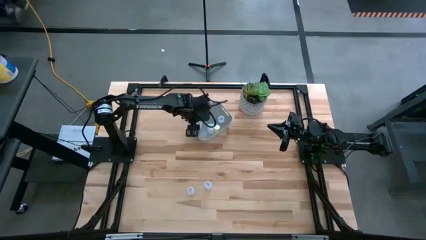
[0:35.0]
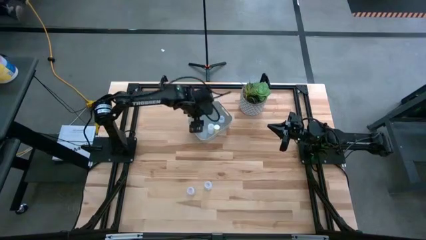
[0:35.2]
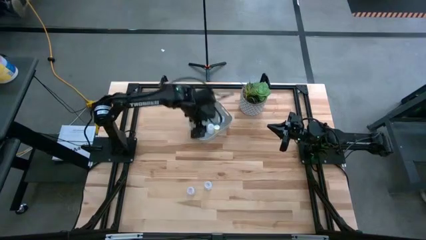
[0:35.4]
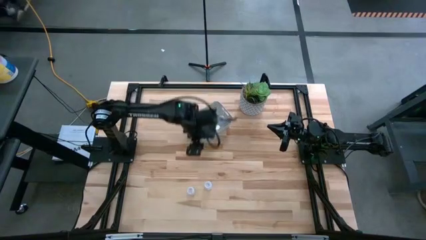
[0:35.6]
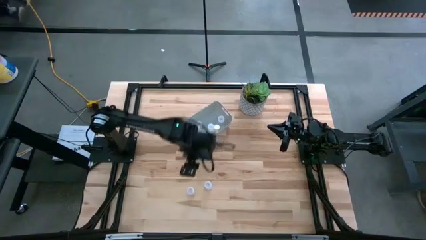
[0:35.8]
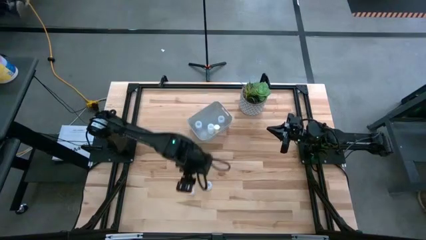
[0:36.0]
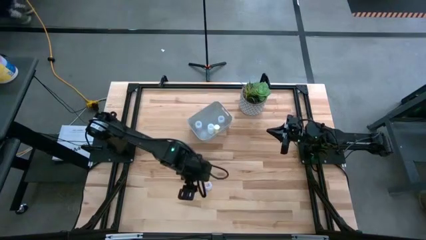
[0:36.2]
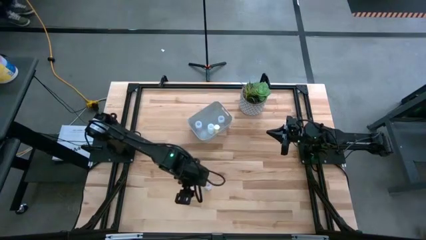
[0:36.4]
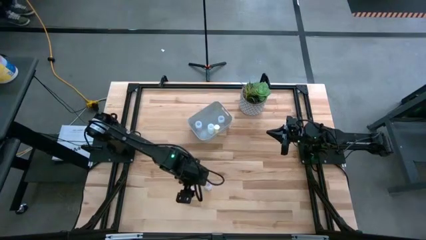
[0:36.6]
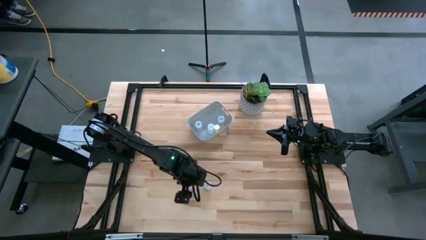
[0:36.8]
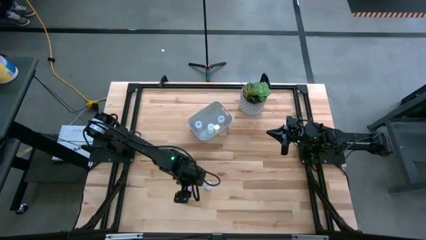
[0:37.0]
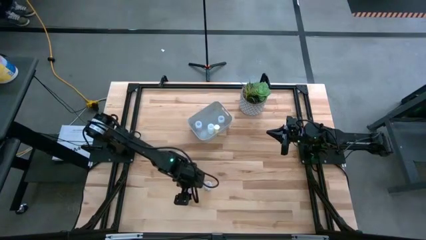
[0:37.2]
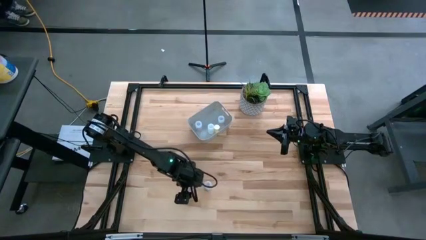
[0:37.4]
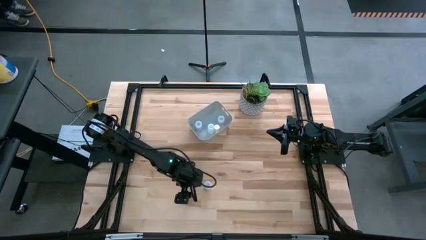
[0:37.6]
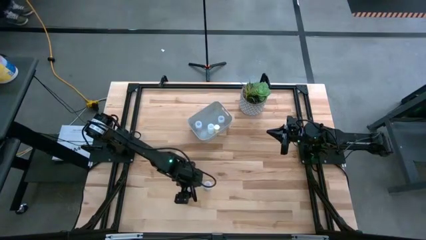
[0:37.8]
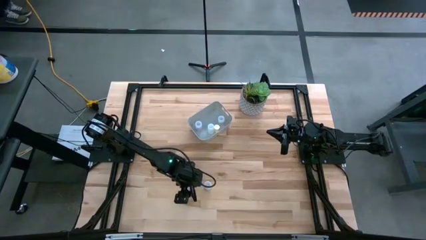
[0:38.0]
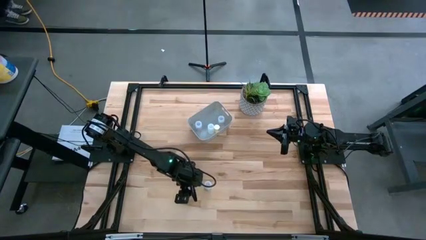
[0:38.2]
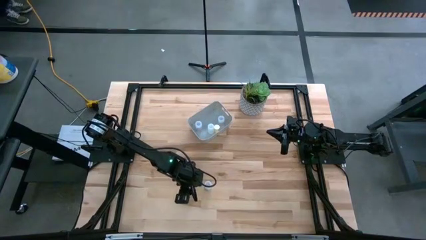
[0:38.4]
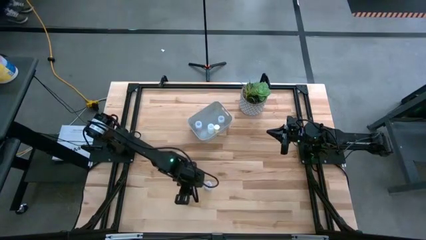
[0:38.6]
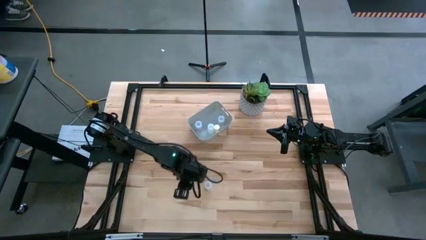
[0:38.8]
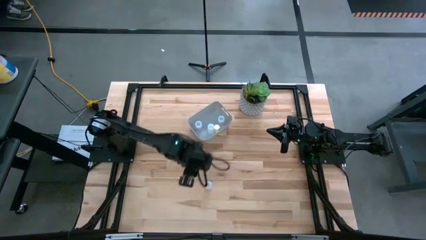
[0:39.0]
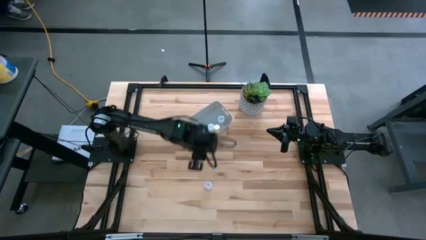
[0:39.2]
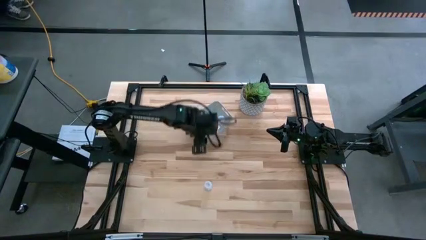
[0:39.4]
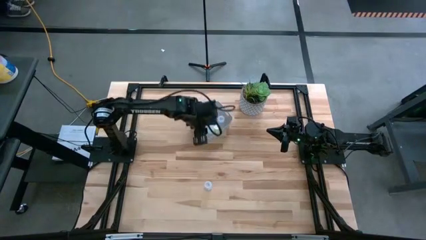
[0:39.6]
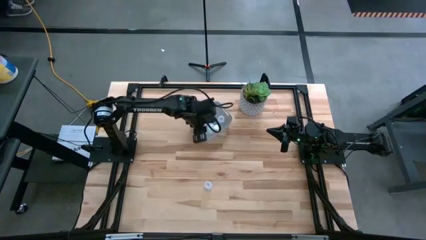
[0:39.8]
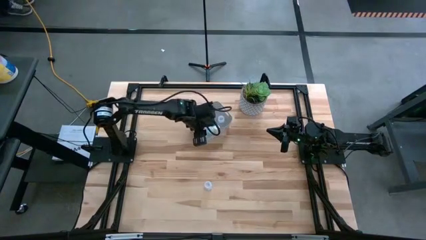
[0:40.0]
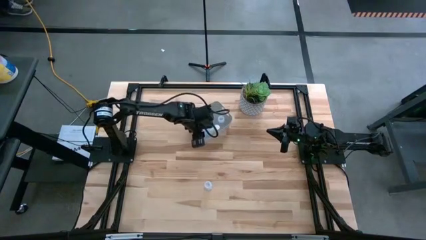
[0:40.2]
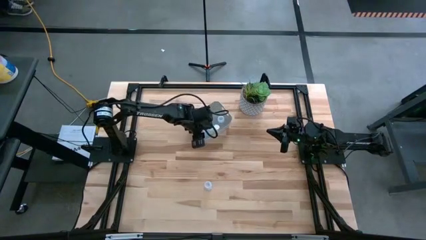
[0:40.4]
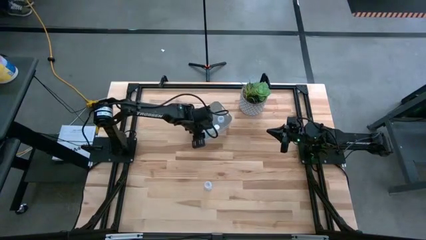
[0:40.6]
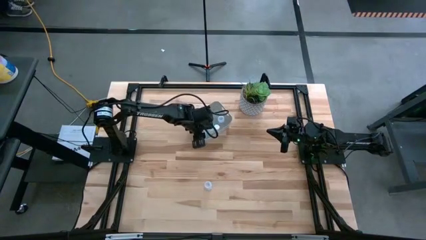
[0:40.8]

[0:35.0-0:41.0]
Task: Pick and place pill bottles into a basket
Put the transparent medicine bottle into the white bin

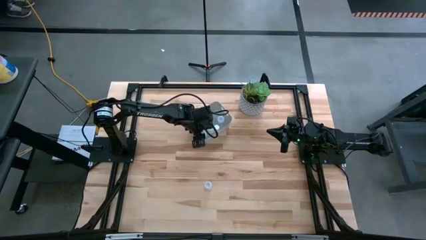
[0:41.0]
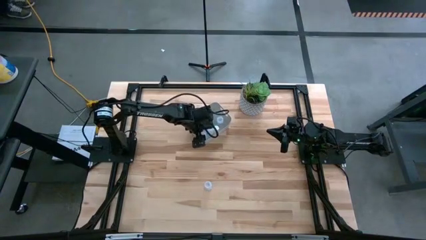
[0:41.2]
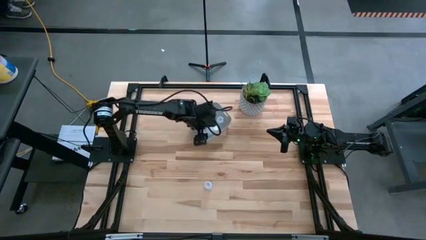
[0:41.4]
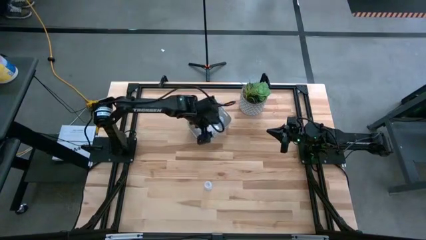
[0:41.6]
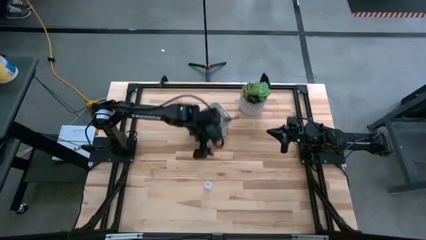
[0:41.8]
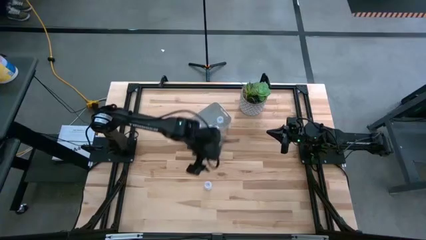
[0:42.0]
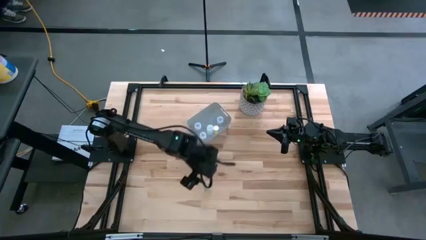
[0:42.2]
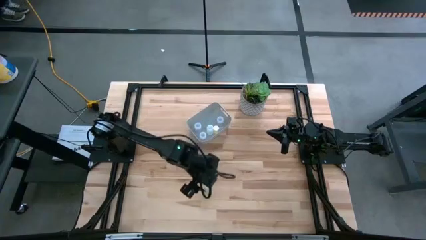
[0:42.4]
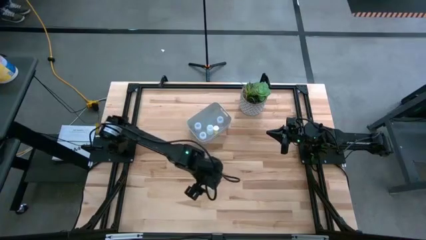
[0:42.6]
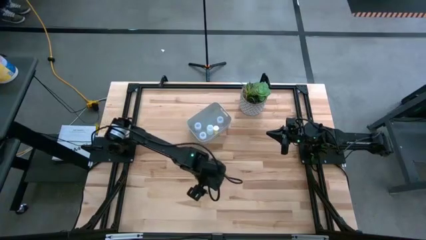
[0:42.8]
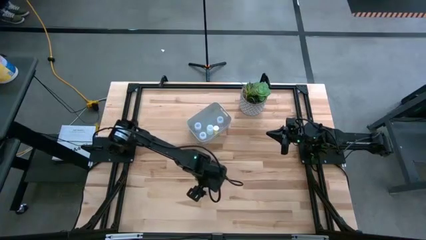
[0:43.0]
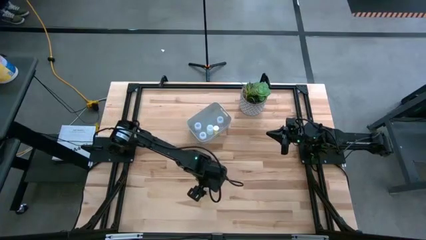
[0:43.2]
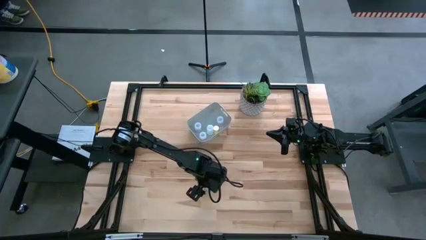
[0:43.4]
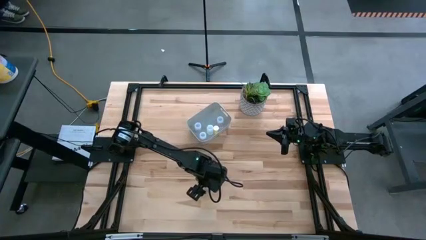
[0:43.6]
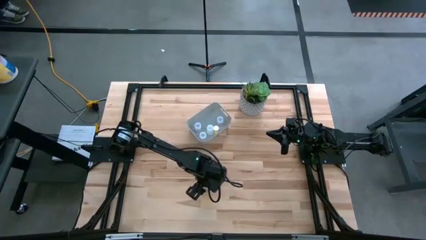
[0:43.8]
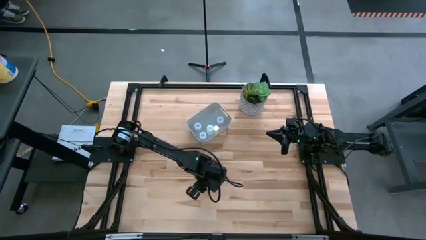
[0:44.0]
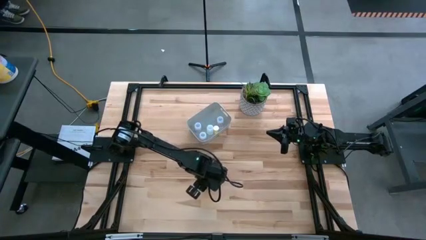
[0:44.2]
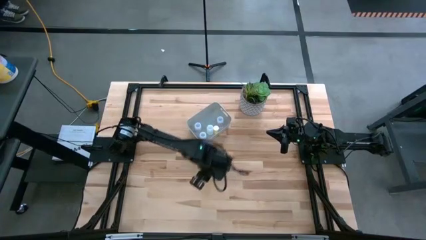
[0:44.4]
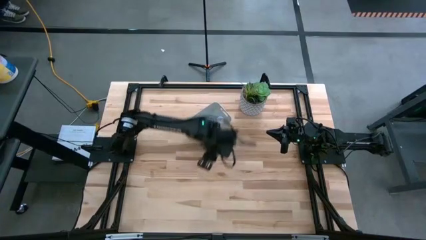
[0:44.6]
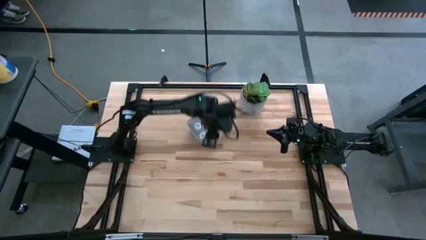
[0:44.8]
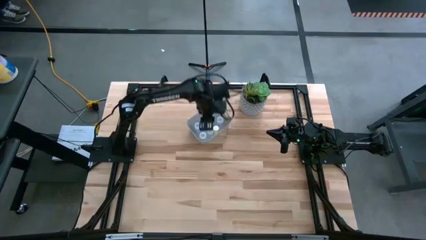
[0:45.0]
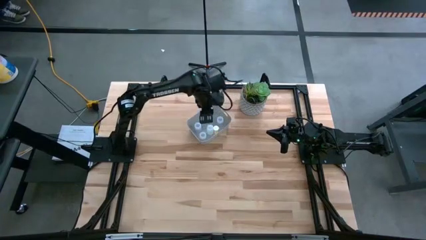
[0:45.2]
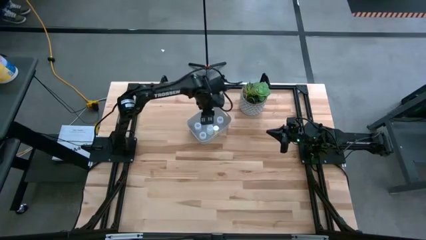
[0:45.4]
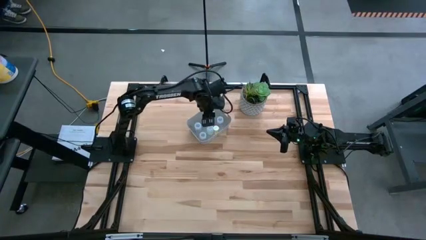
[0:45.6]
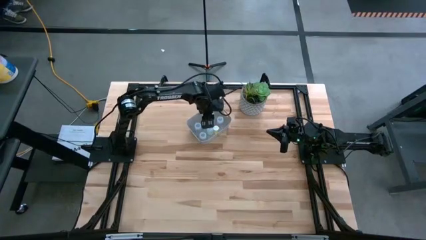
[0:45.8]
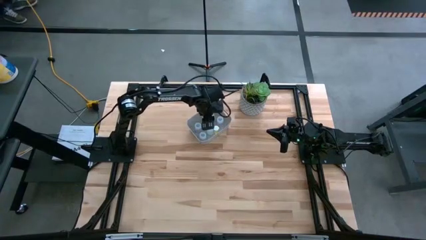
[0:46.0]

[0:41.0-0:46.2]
Put the transparent medicine bottle into the white bin

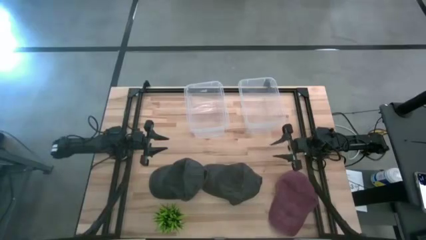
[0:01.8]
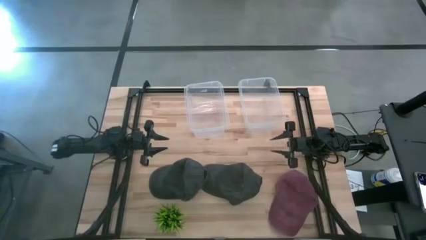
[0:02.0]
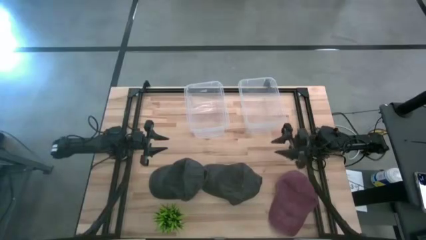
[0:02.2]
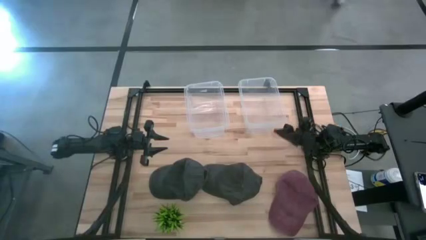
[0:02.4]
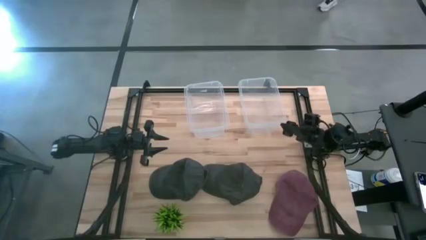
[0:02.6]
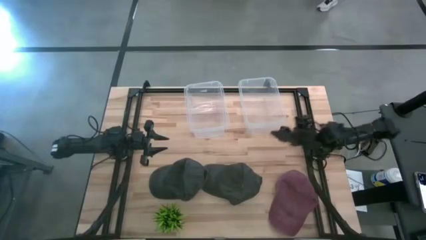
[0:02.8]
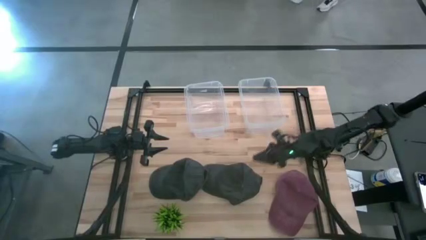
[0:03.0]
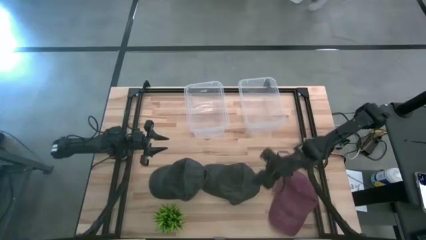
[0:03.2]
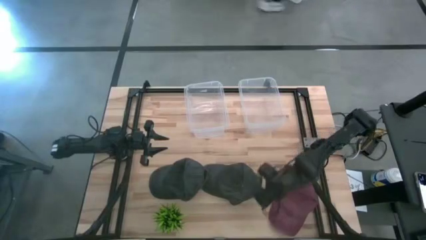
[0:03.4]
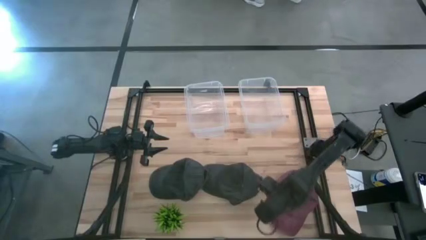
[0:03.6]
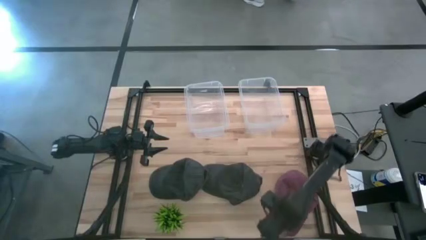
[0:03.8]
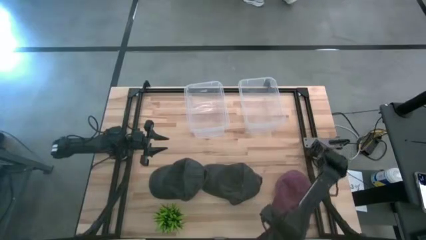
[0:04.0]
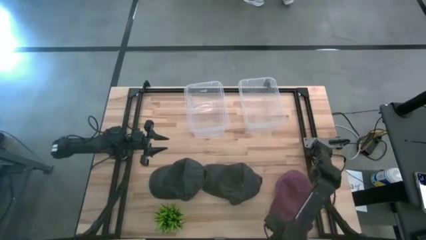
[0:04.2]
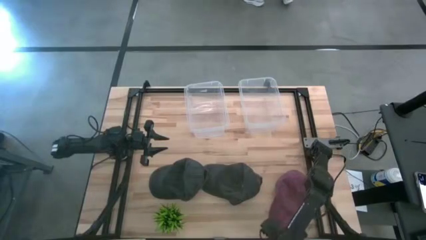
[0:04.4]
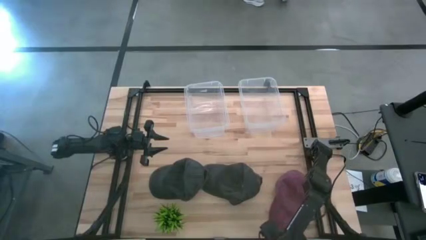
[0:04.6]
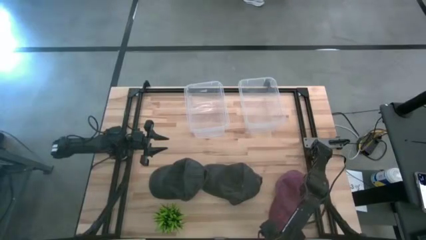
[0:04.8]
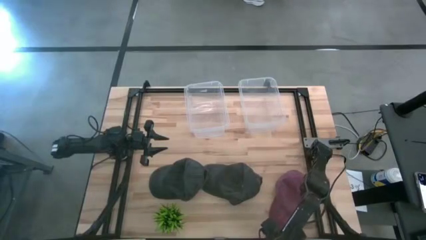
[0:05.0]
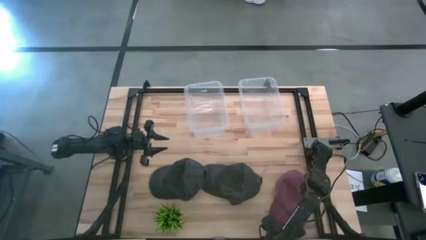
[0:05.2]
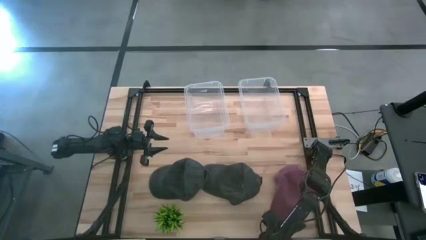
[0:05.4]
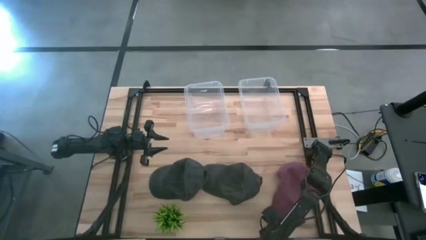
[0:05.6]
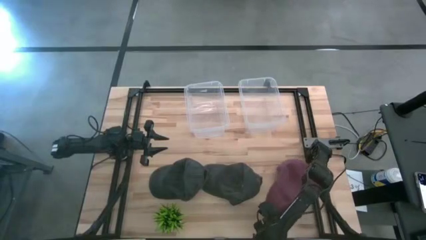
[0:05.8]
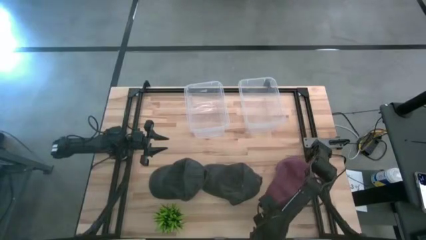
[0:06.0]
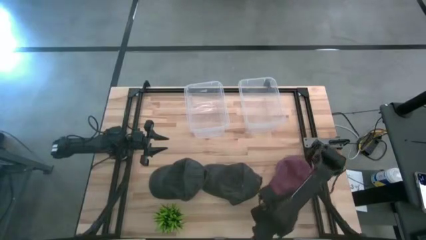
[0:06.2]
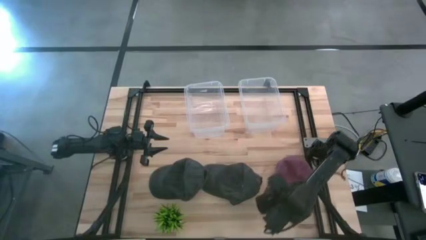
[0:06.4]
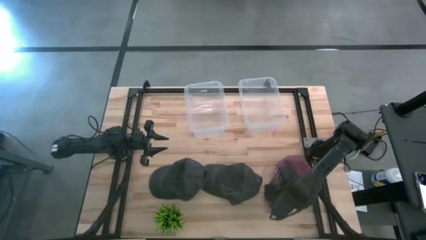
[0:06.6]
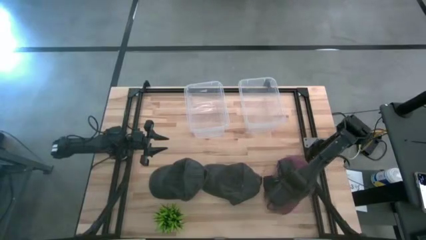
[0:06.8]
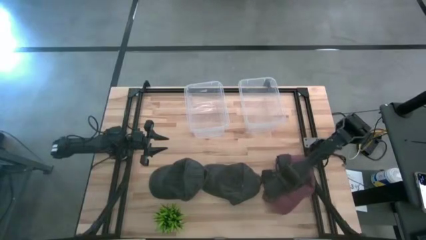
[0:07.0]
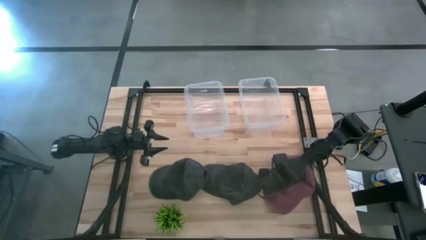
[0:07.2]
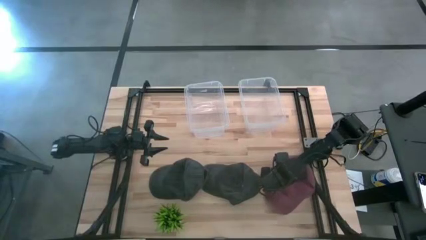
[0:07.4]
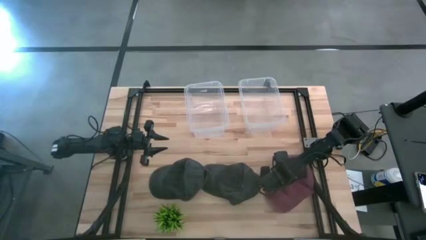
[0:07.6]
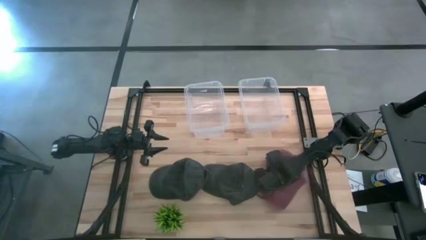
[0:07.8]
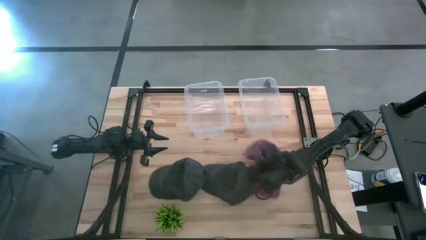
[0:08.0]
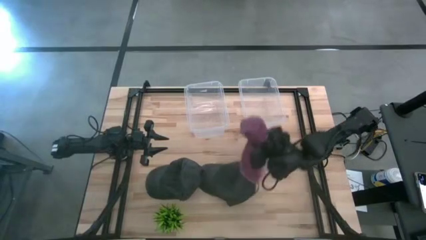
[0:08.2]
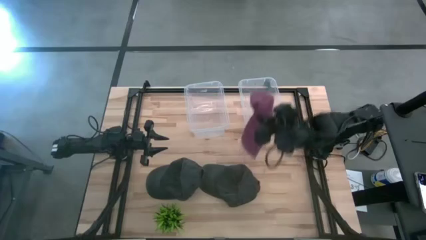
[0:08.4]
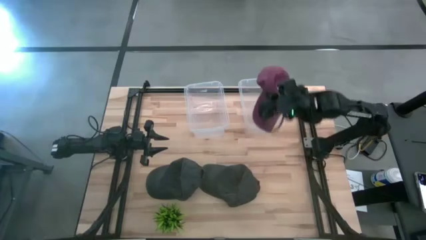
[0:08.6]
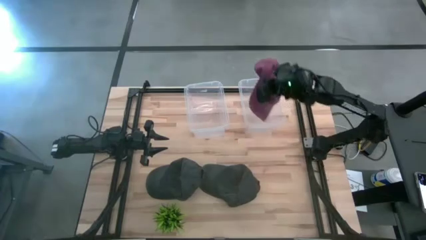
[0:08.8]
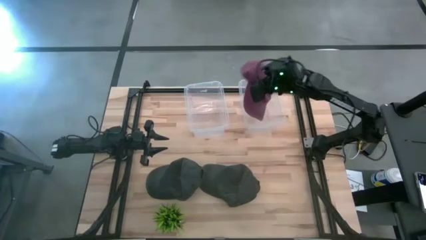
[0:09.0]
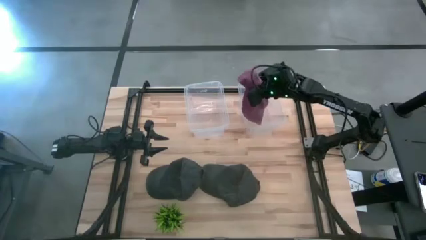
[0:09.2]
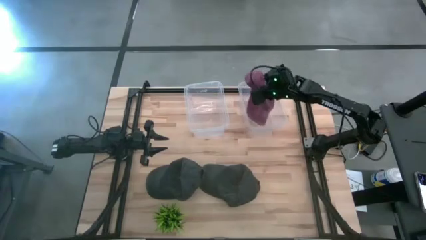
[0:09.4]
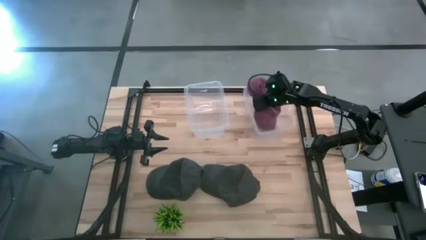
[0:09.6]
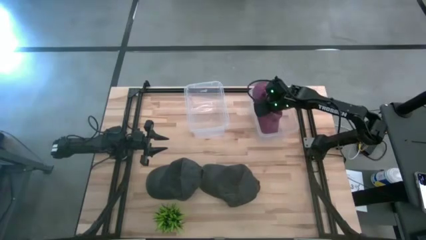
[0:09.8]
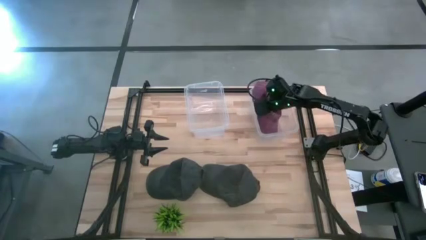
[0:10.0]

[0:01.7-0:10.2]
Task: Pick & Place hat
Put the red cap into the right transparent bin
